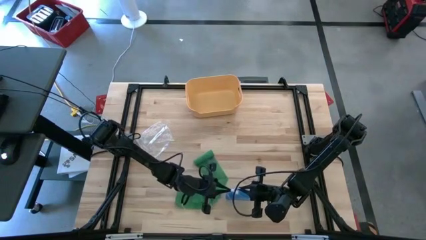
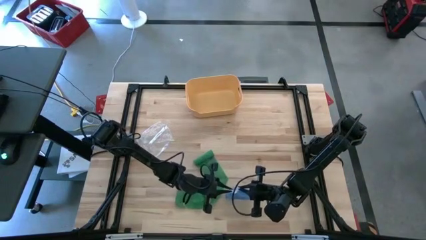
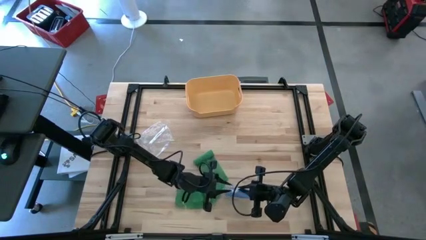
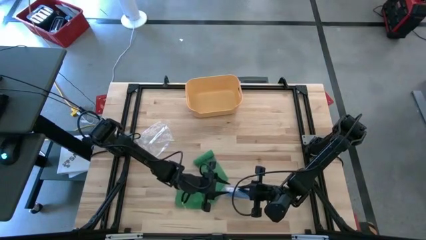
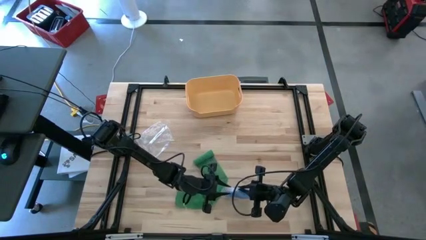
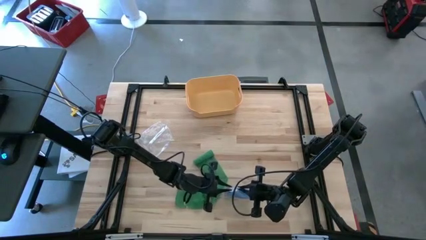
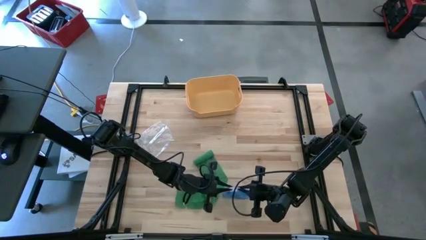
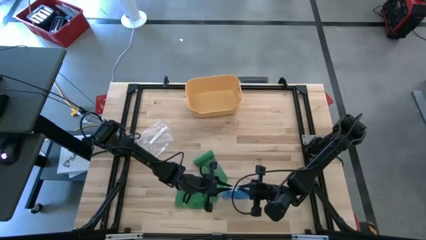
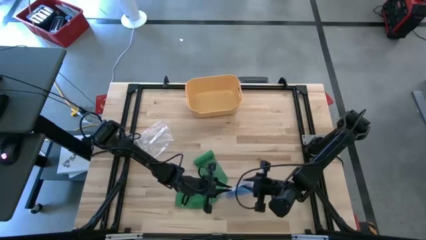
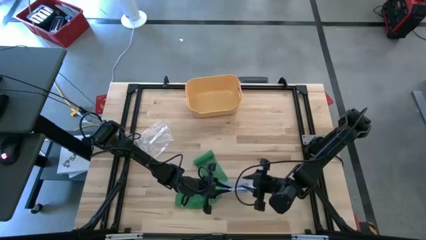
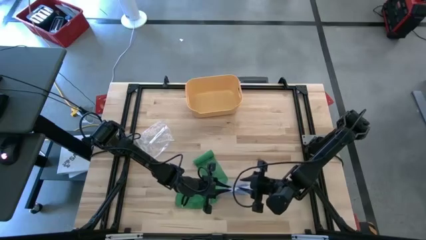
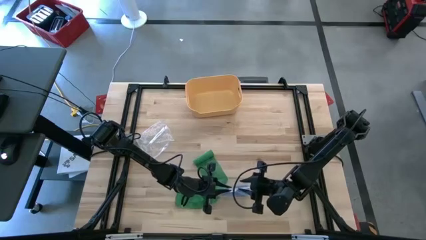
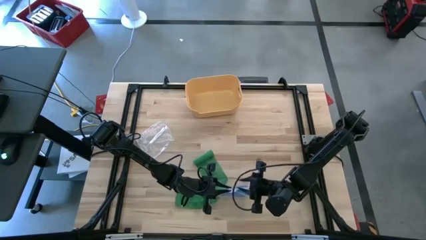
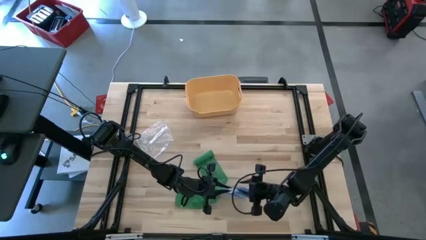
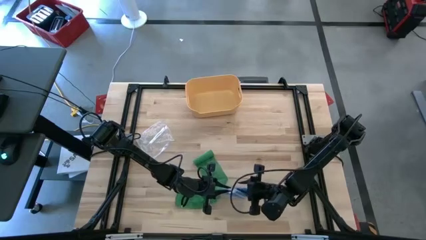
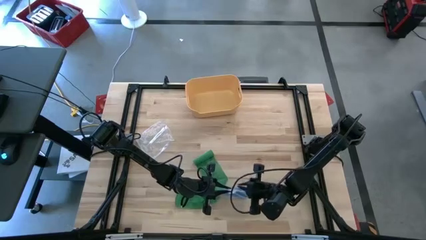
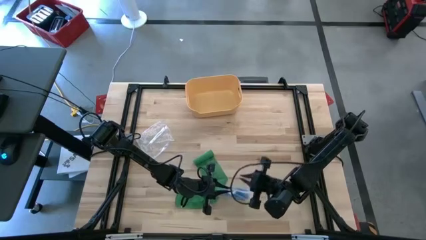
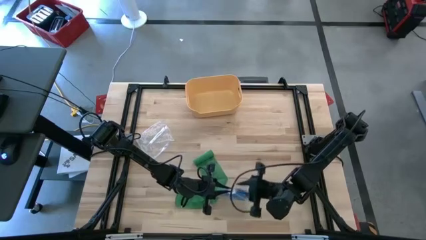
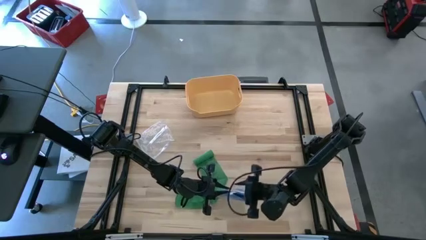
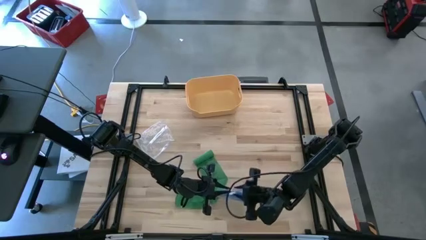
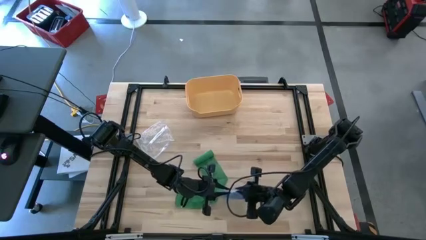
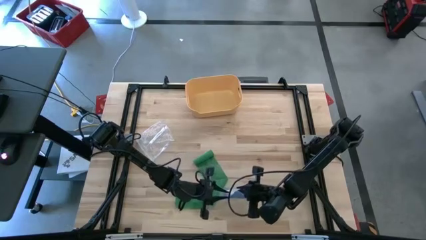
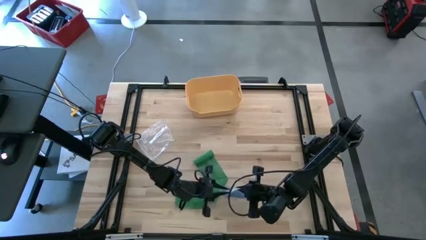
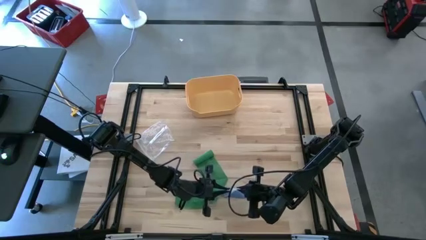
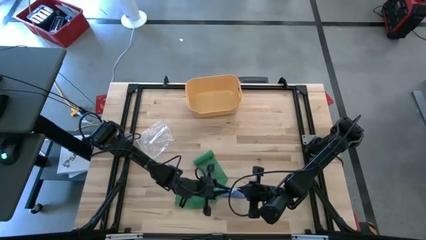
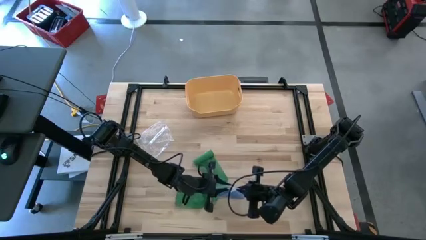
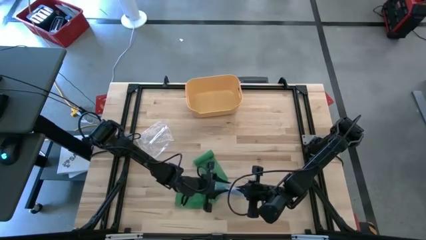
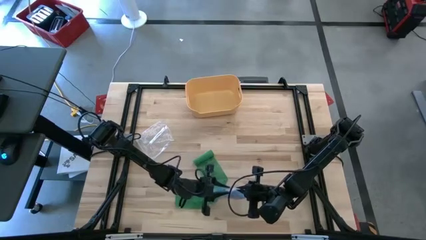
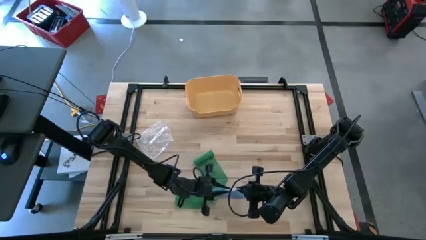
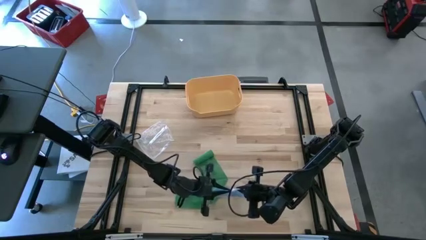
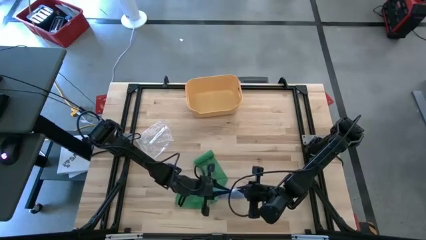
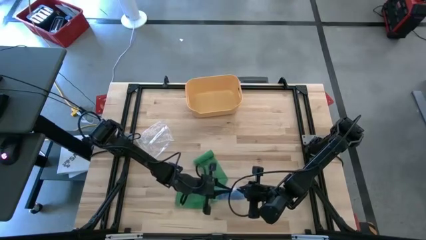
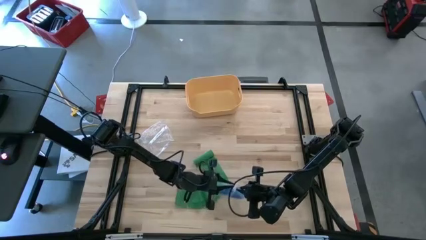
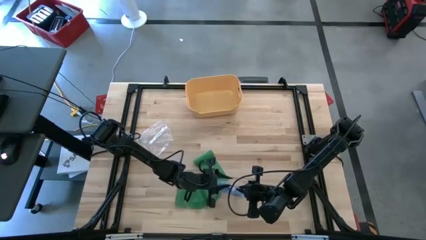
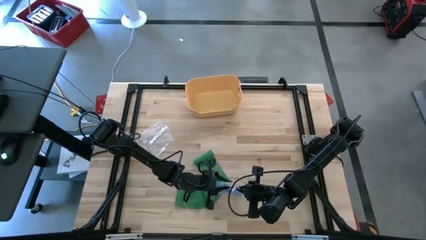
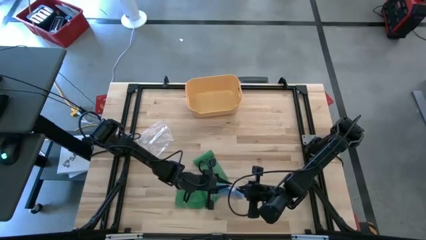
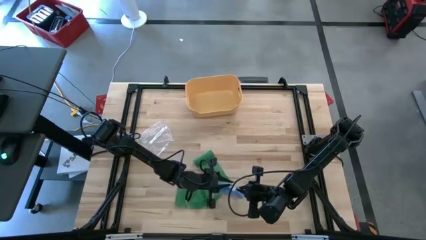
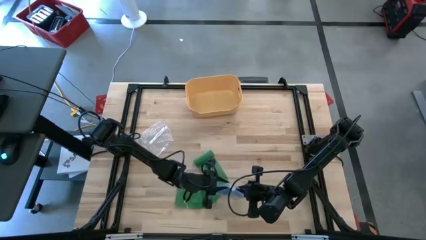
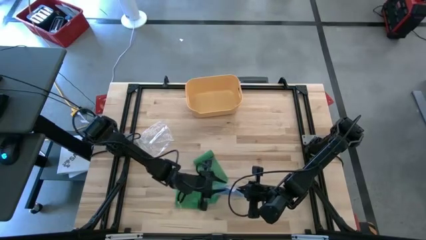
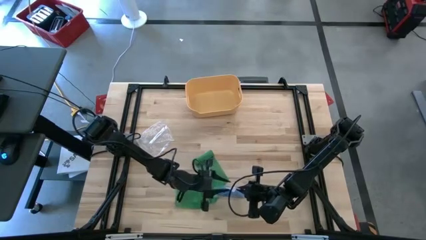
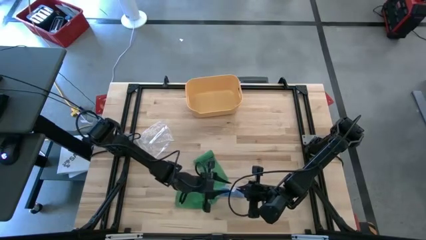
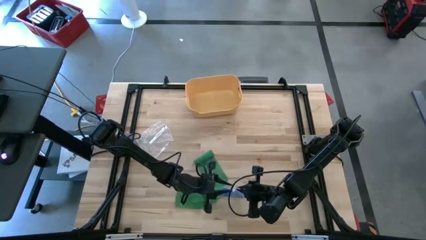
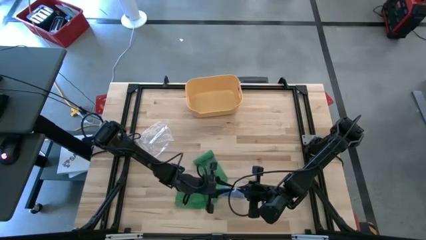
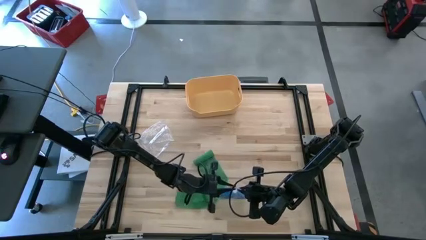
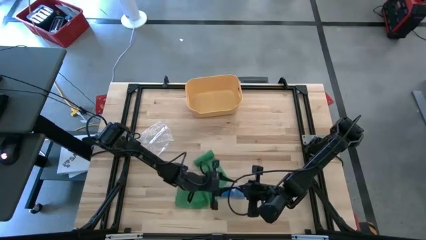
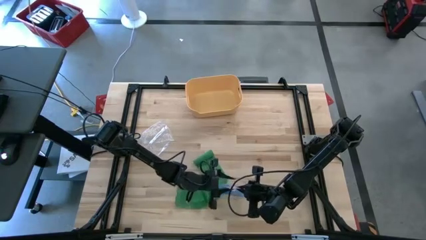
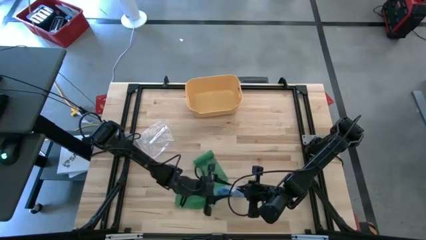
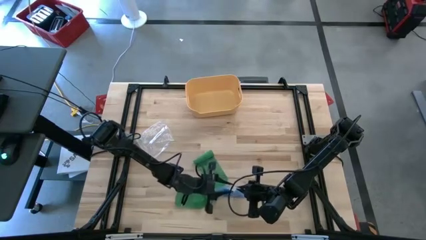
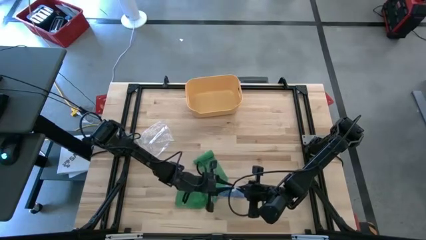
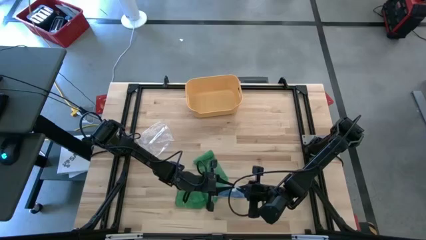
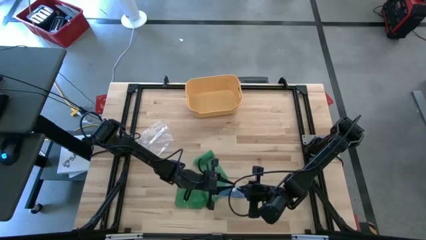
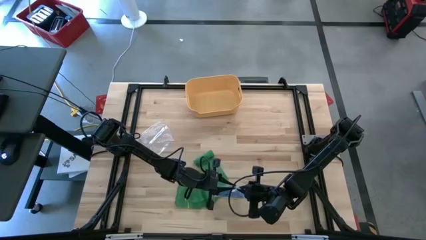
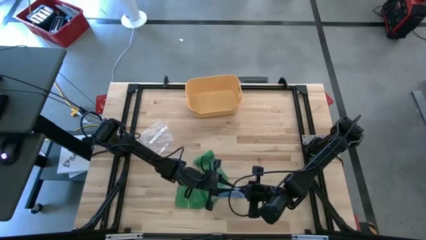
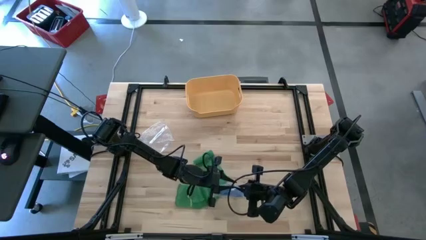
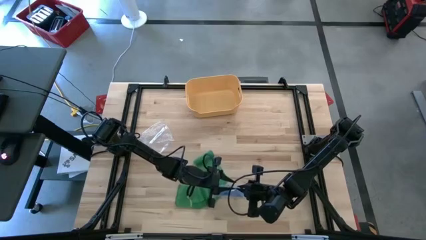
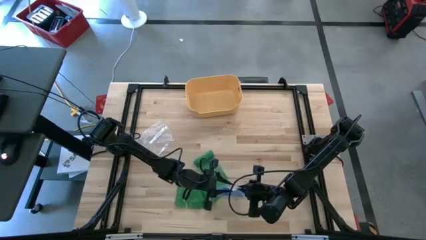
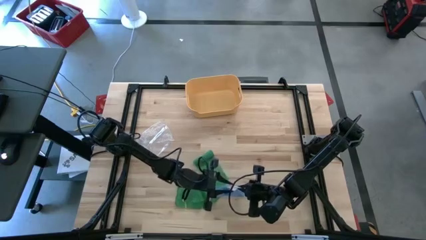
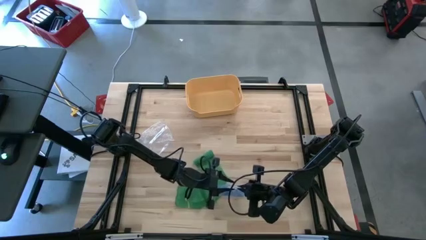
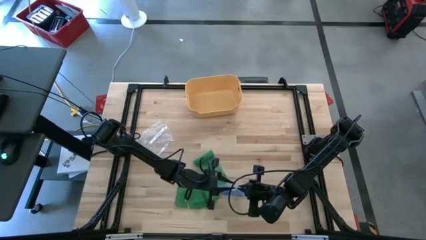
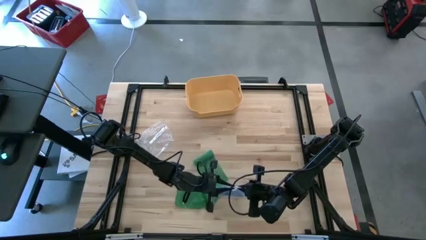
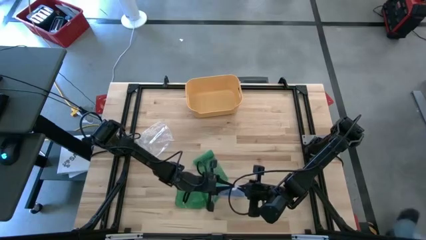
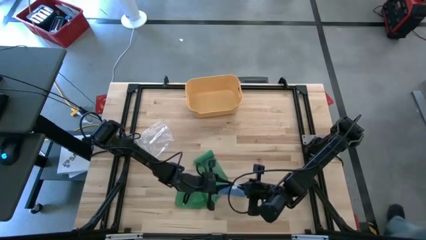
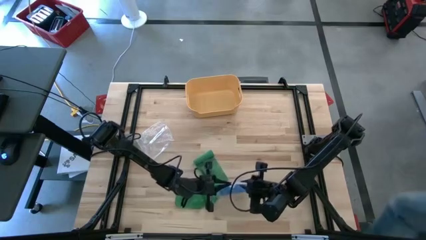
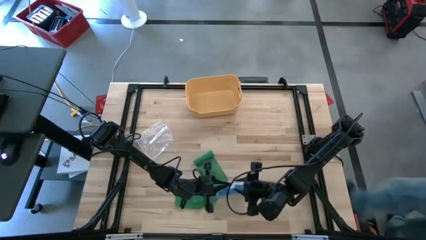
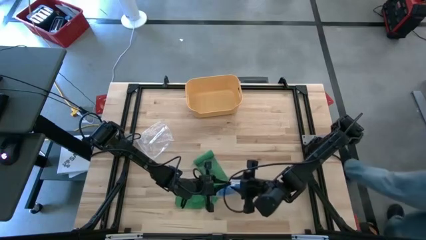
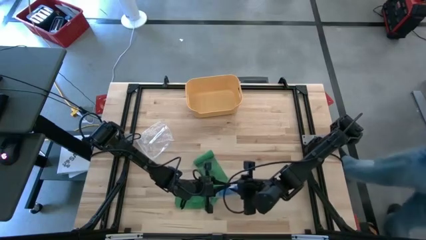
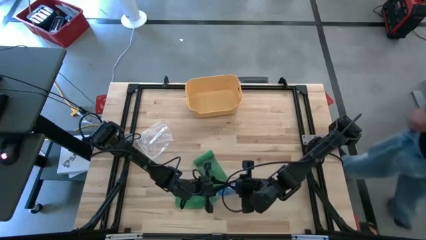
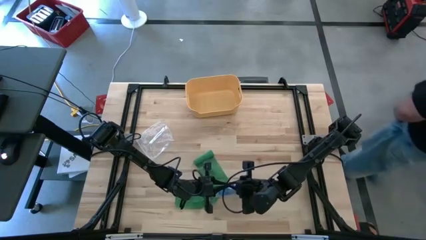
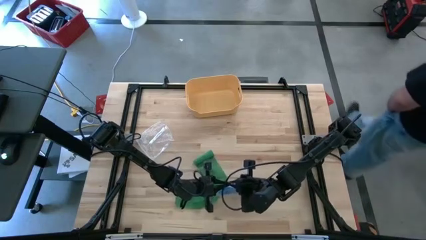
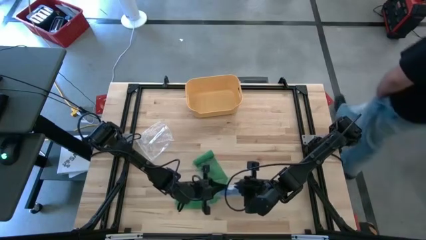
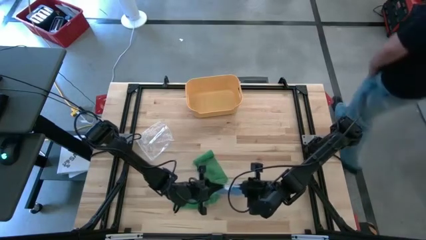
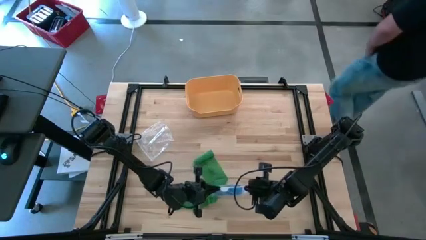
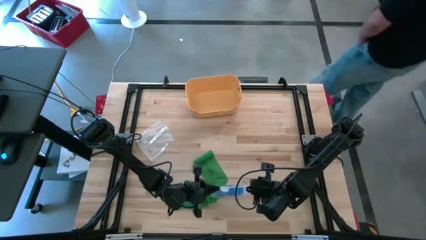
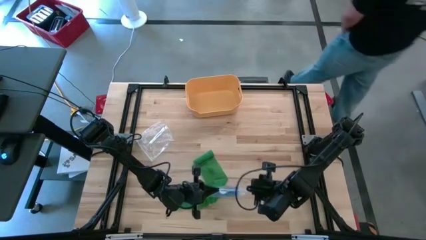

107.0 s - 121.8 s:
Task: Roll bandage
Close the transparent zip bag containing the rolled blue bandage

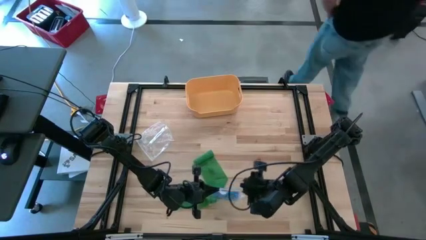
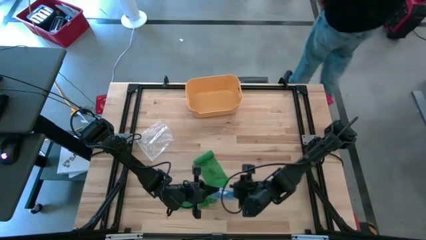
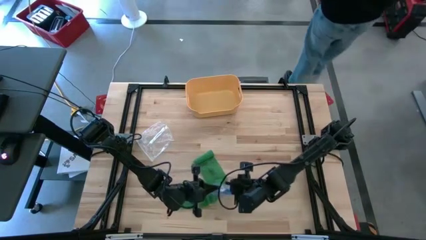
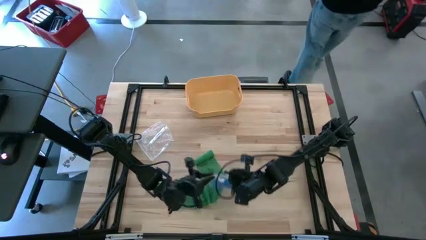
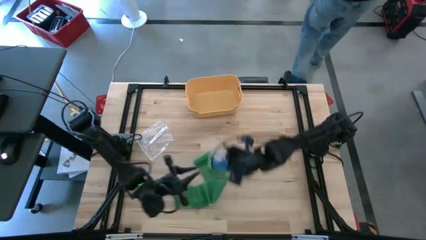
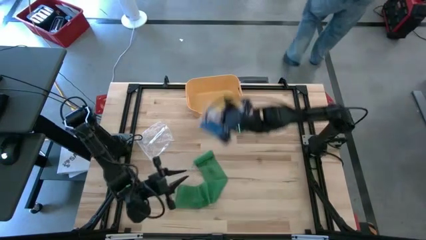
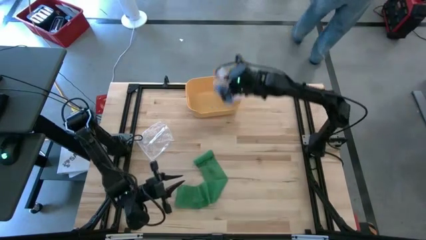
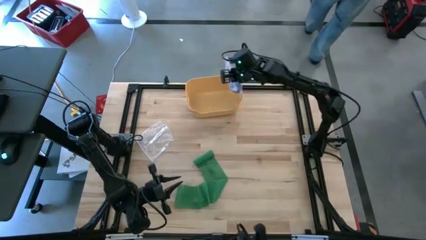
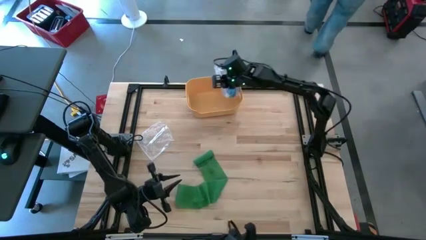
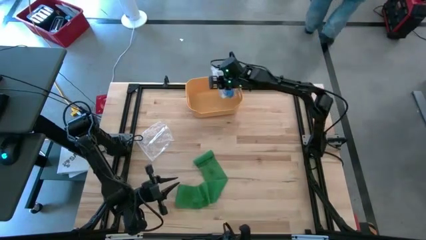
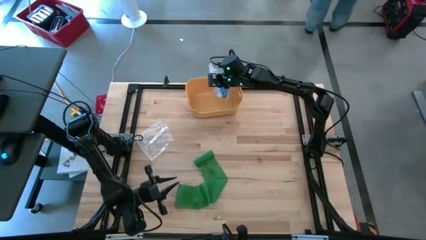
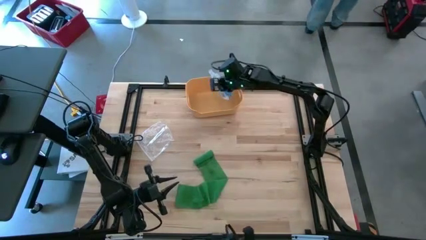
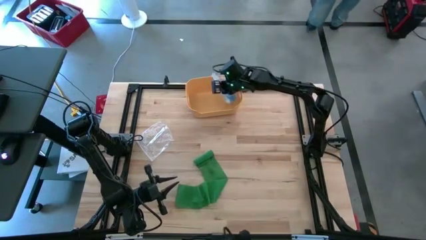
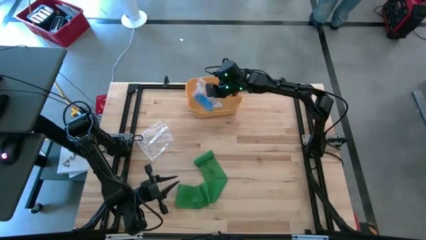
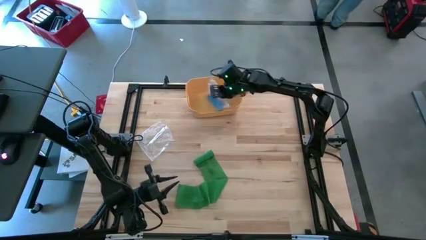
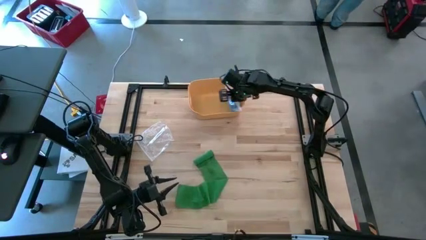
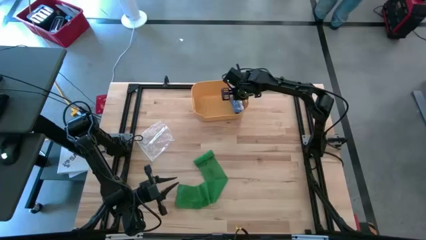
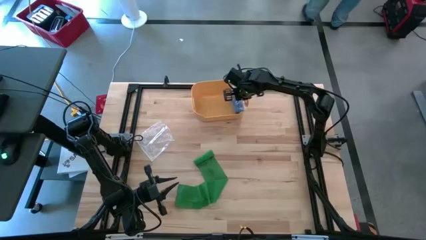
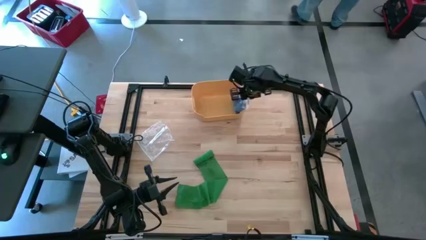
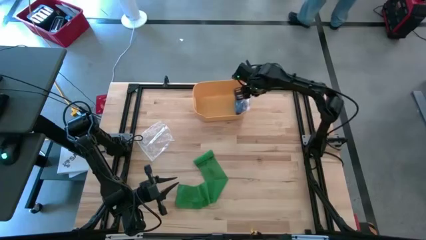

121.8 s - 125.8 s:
Put the transparent zip bag containing the rolled blue bandage into the yellow bin
